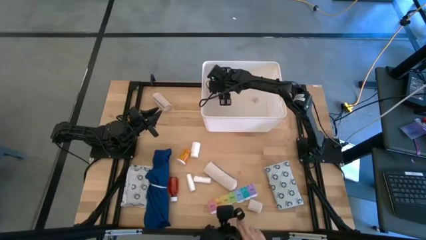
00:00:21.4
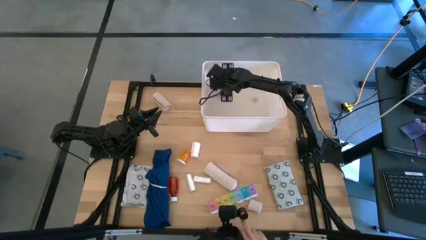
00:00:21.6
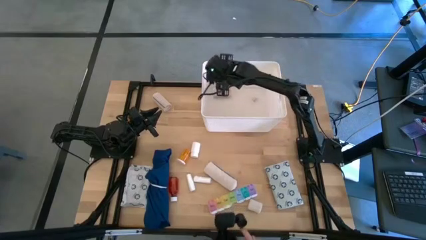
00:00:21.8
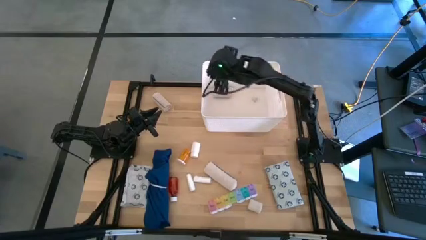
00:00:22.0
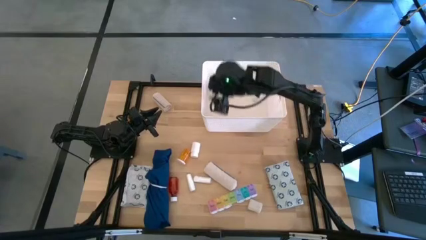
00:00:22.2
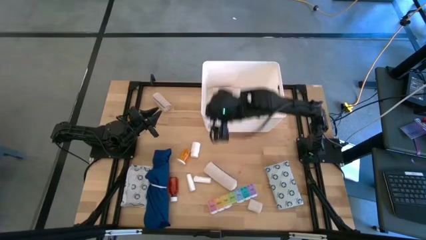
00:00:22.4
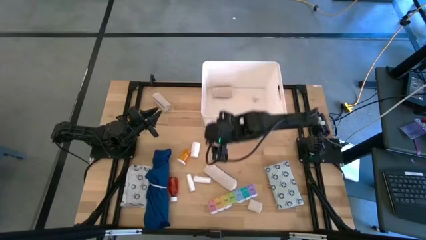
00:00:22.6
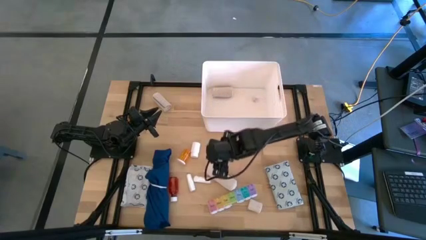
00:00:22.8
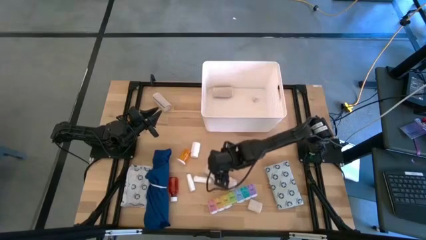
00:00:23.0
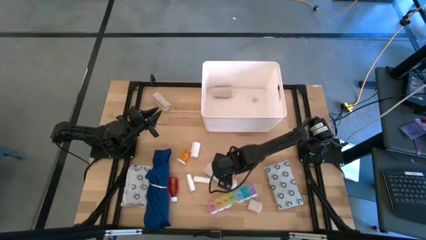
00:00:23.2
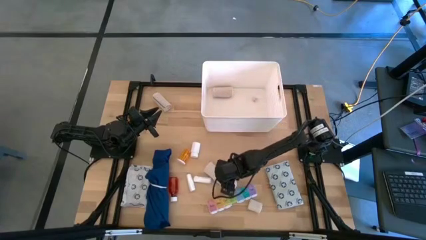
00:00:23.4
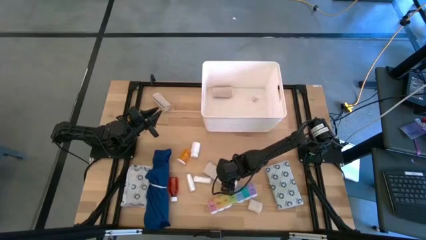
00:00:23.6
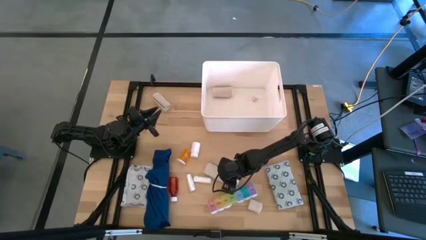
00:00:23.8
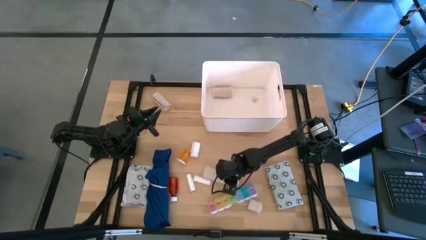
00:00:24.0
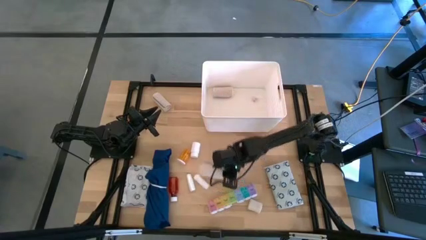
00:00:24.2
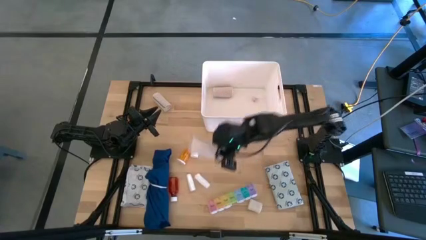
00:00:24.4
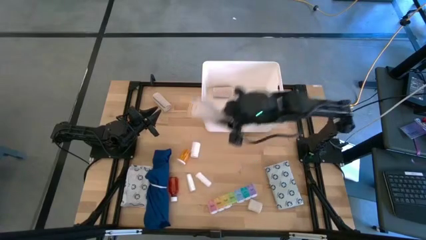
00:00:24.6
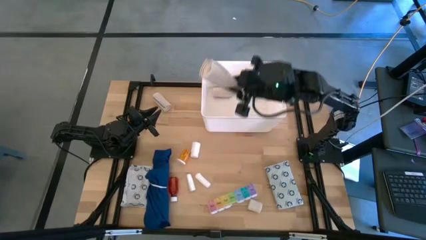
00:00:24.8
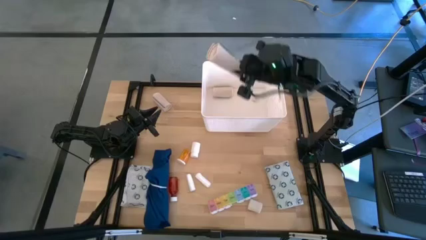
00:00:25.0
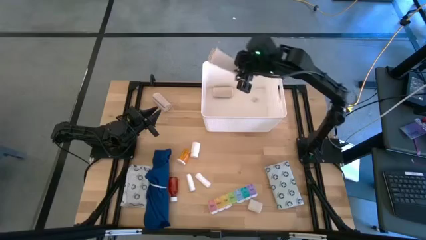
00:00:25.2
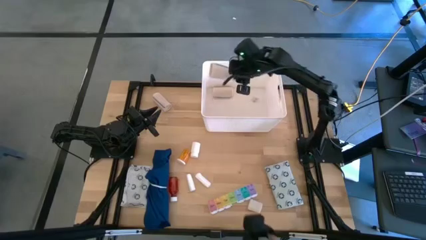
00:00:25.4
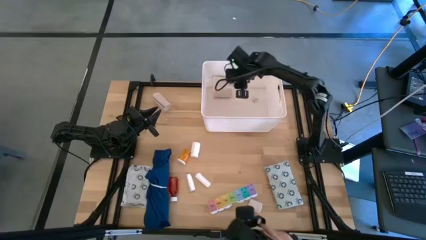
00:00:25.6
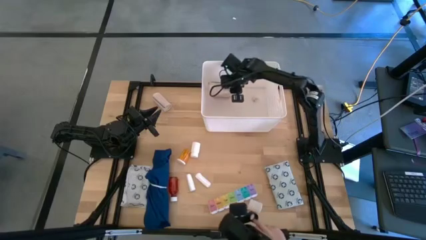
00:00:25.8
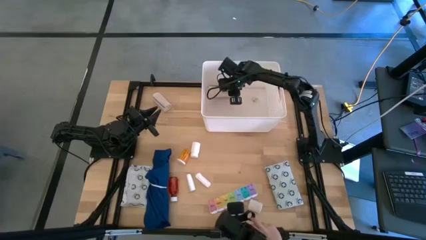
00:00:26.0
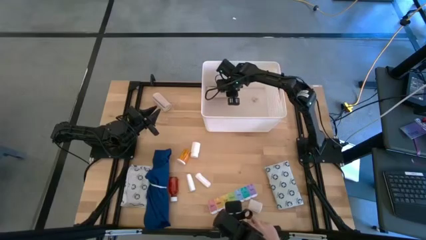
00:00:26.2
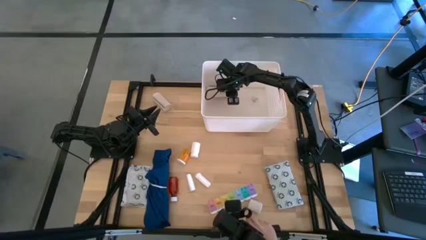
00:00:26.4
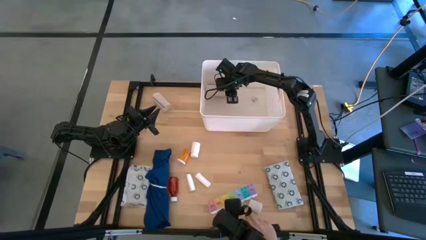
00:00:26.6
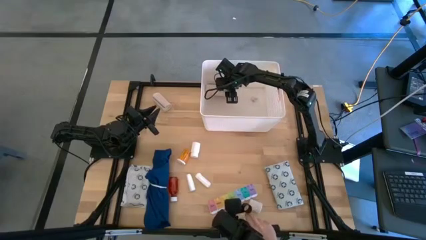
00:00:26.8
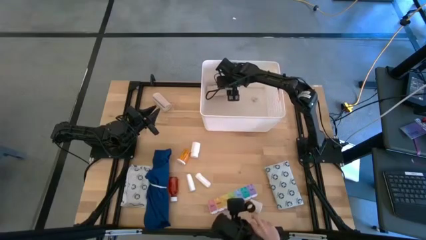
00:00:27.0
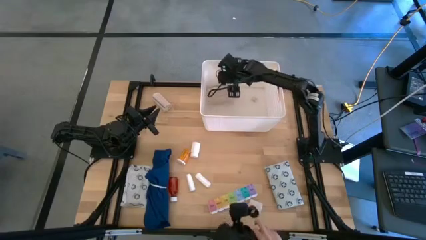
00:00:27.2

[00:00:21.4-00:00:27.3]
Task: Pick & place medical supplies in basket/bin
Put the rolled brown bandage into the white container

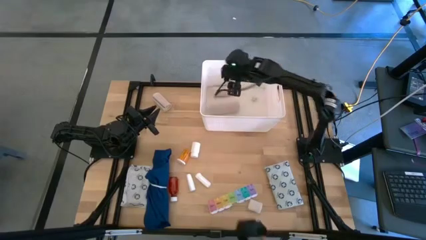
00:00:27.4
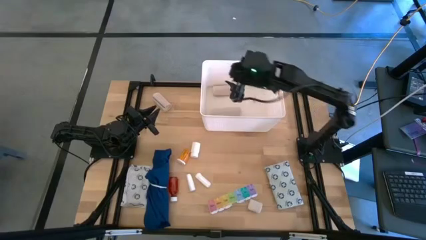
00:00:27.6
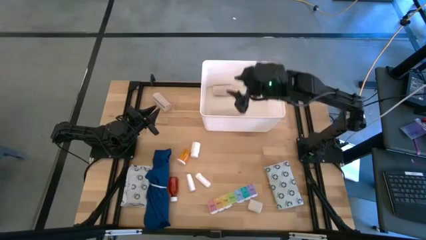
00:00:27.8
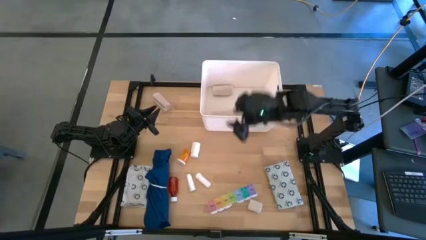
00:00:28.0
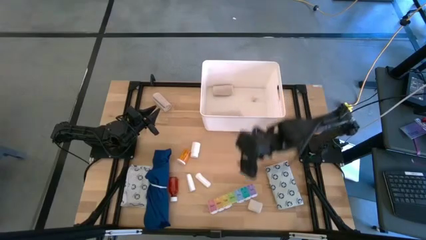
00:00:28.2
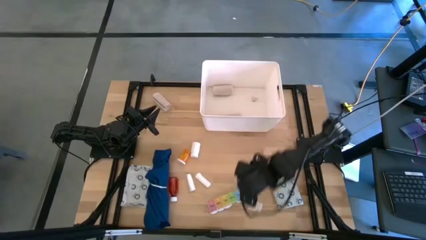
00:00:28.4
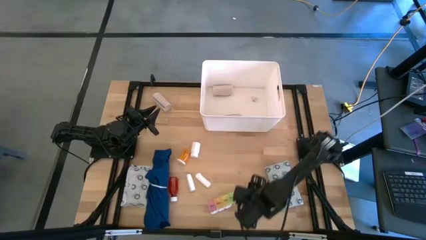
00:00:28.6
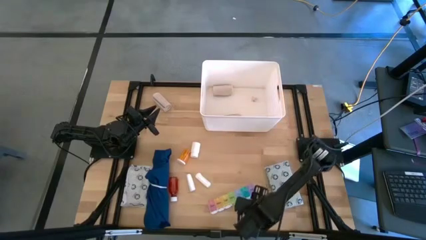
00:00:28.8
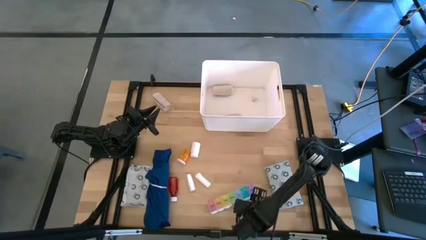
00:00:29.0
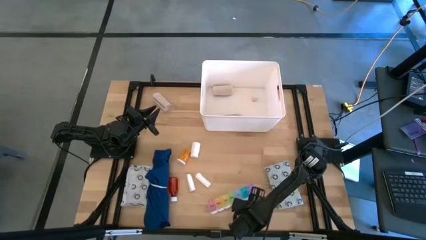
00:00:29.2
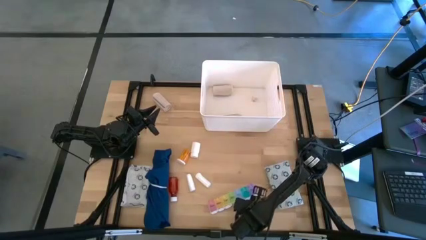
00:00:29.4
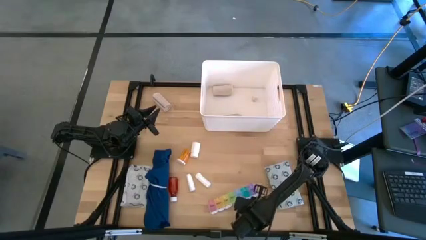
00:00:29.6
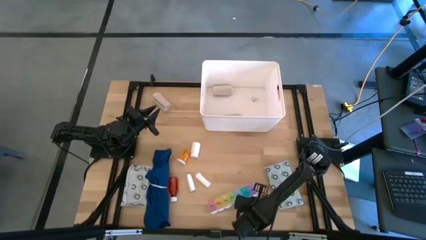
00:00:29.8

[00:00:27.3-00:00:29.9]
Put the rolled brown bandage into the white container

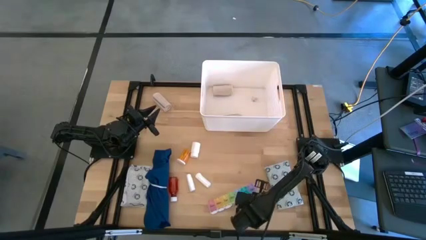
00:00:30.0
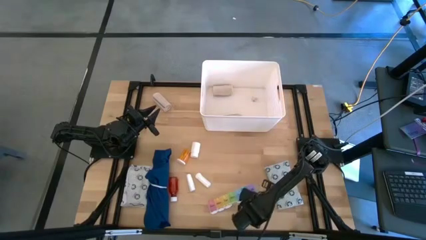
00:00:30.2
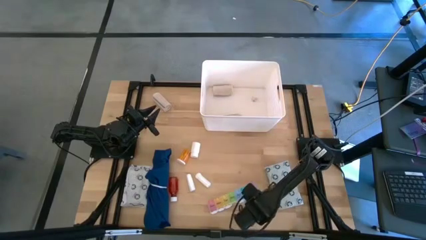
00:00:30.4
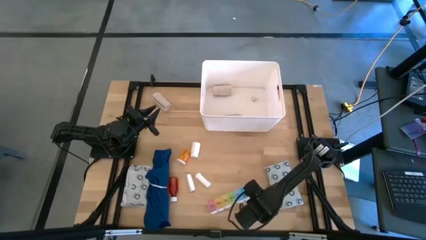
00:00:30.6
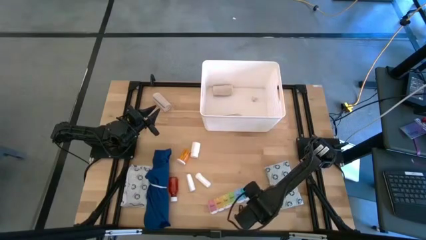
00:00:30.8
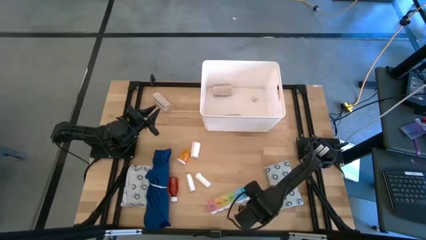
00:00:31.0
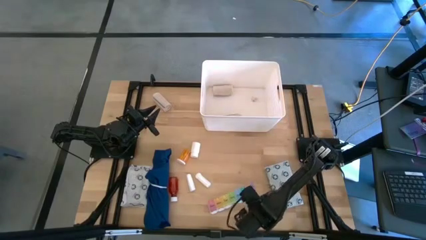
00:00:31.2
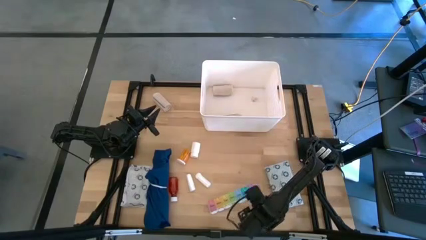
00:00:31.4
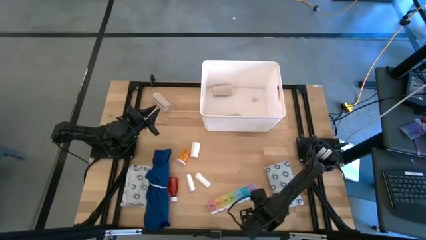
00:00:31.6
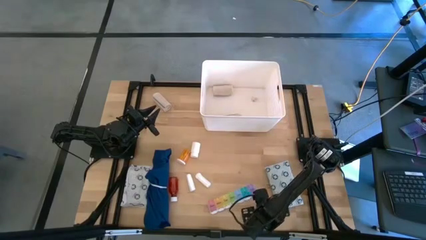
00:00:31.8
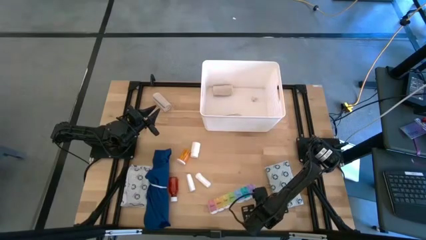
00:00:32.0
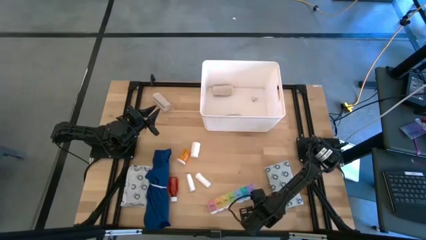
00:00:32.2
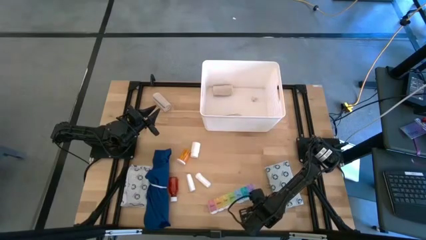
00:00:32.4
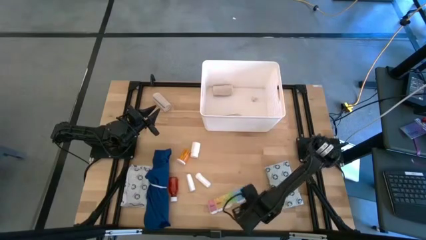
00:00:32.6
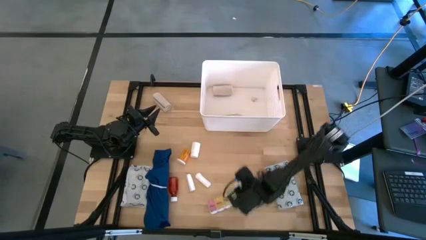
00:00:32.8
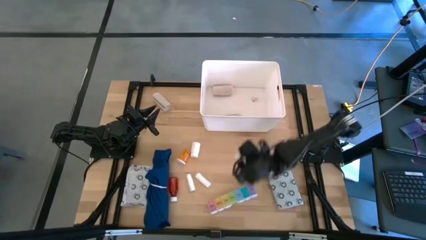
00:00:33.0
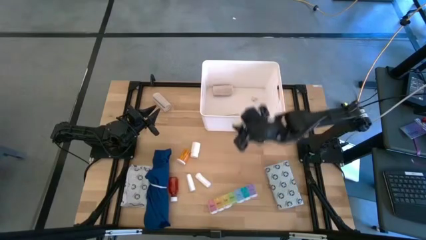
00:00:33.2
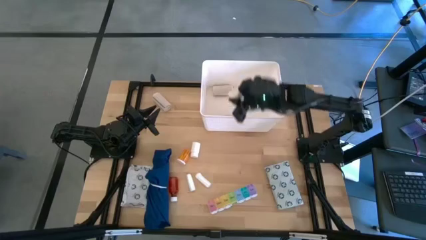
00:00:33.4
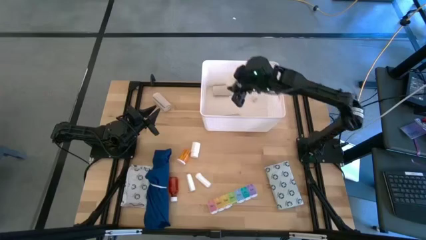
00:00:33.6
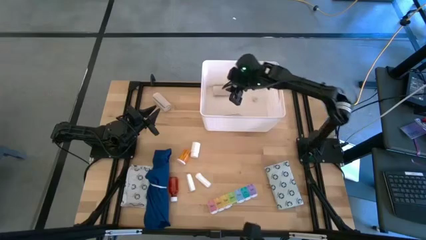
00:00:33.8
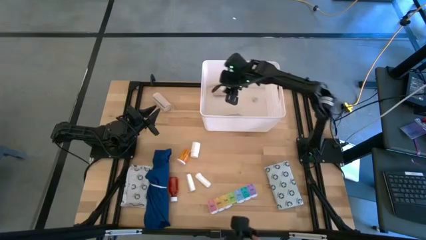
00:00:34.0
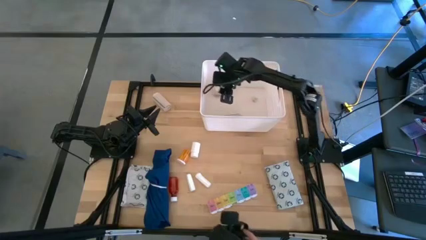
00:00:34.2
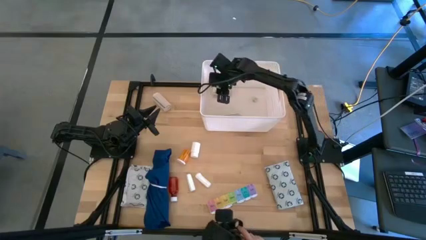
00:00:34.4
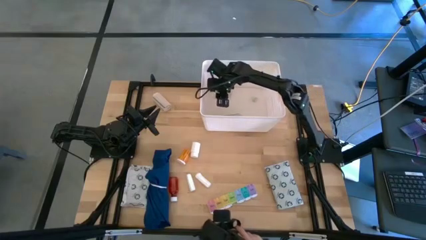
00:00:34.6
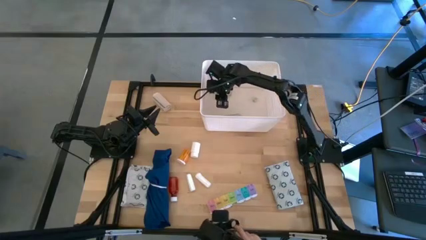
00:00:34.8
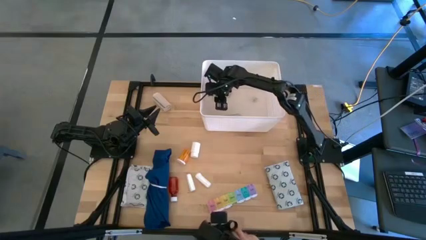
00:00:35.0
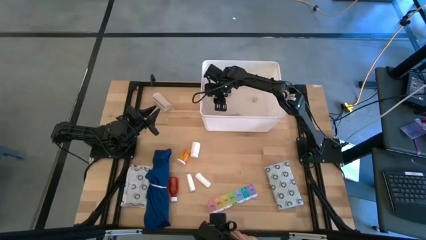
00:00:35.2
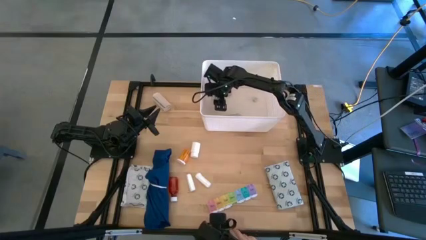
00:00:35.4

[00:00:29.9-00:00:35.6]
Put the rolled brown bandage into the white container
